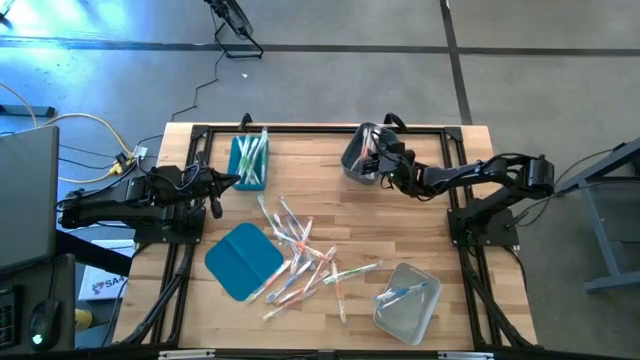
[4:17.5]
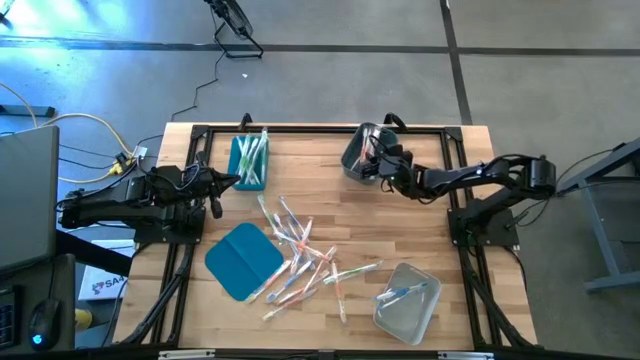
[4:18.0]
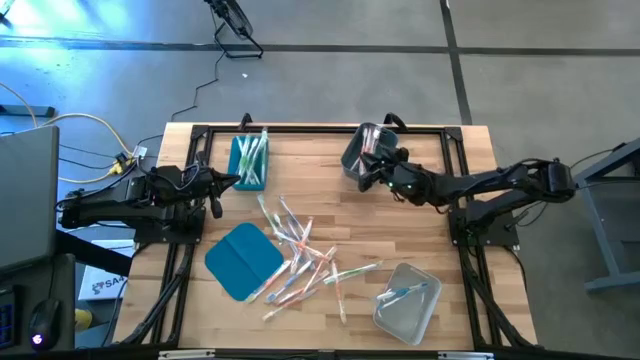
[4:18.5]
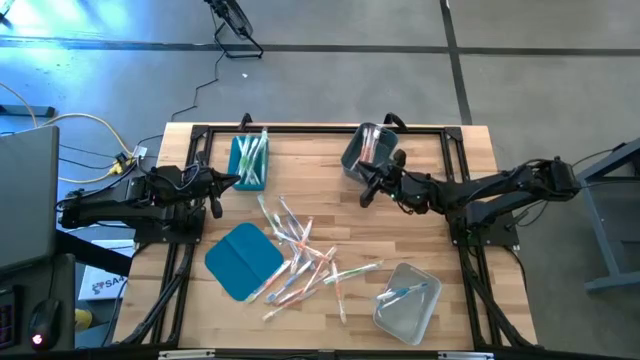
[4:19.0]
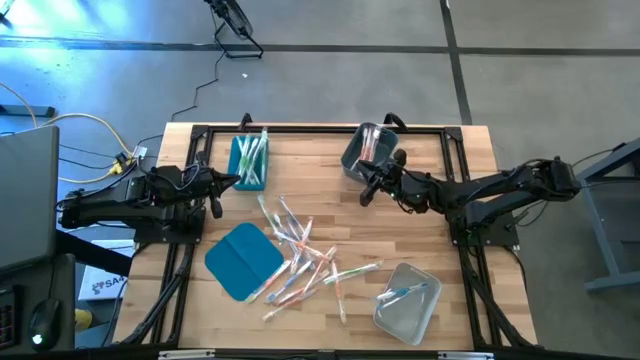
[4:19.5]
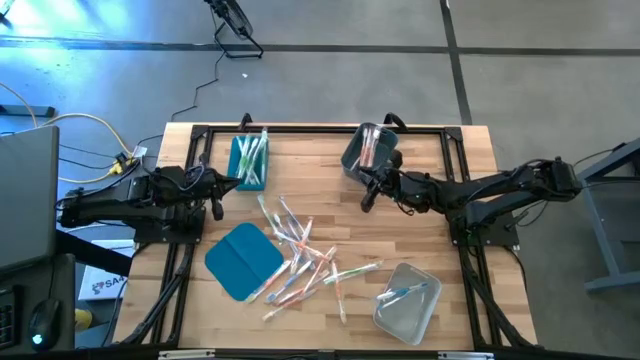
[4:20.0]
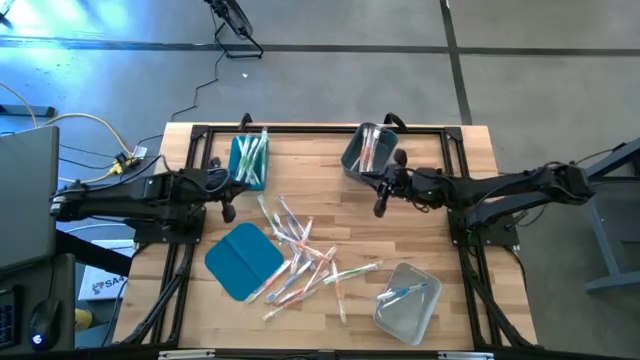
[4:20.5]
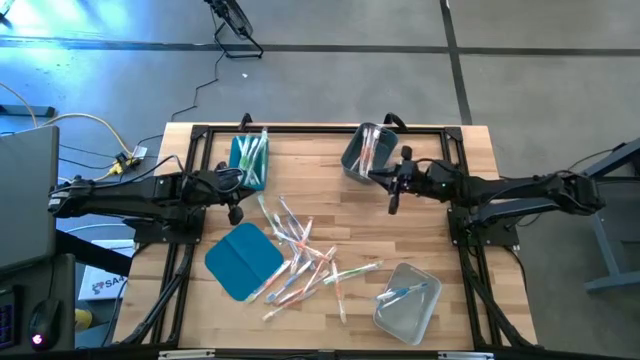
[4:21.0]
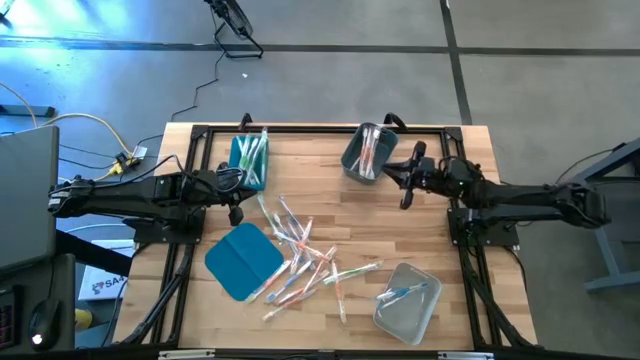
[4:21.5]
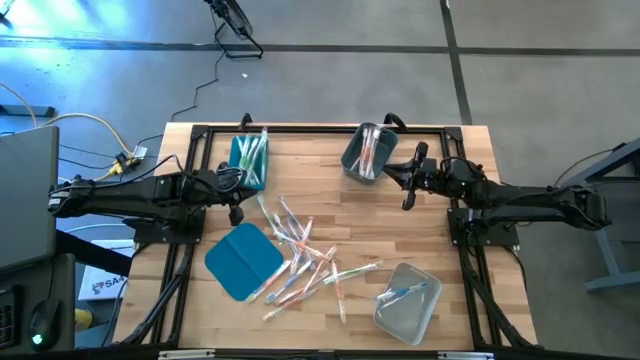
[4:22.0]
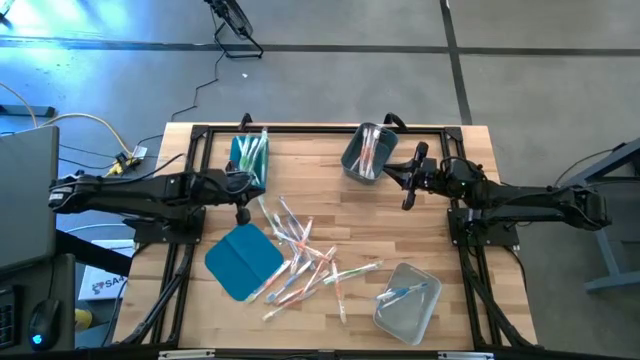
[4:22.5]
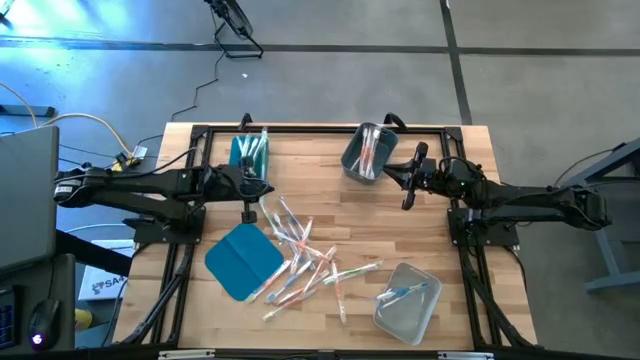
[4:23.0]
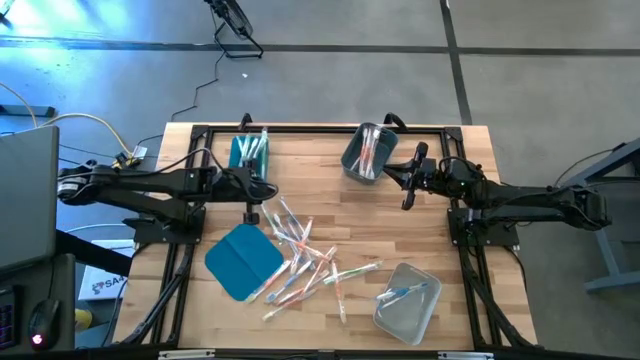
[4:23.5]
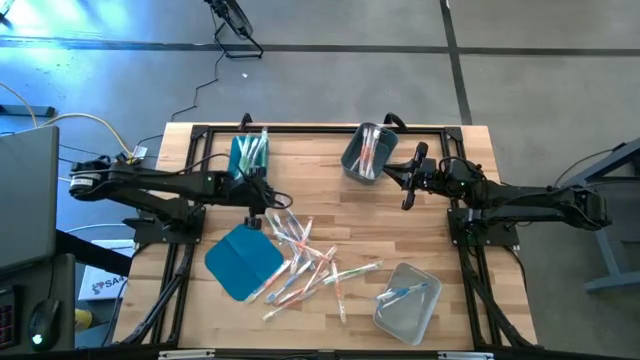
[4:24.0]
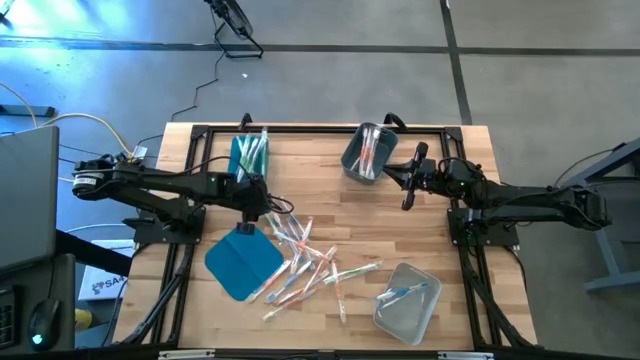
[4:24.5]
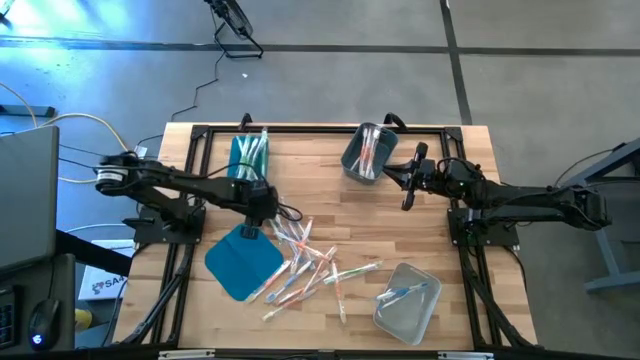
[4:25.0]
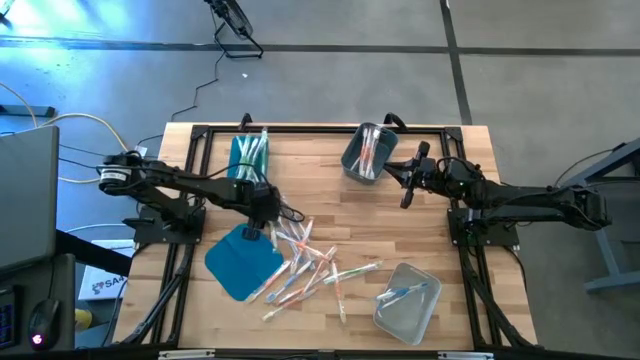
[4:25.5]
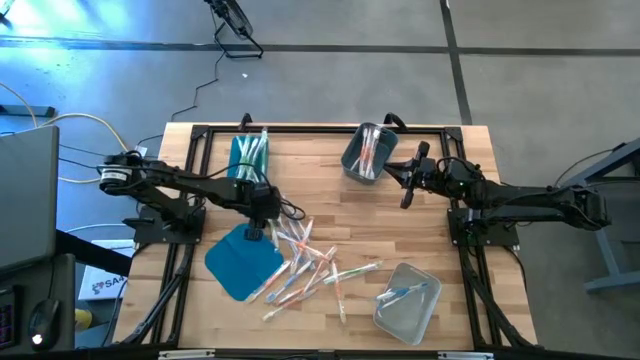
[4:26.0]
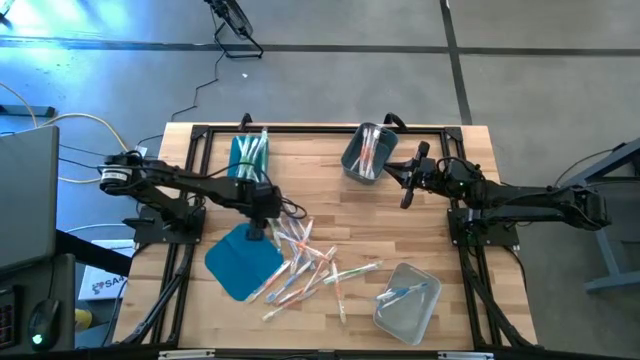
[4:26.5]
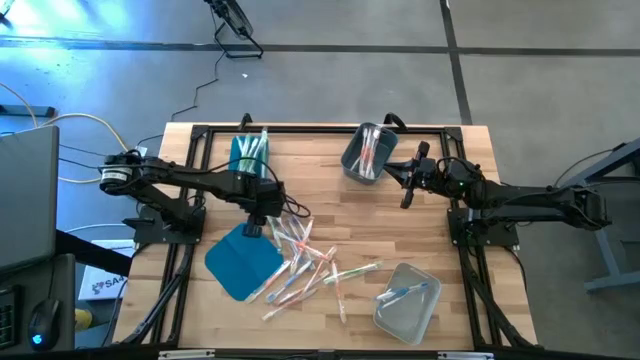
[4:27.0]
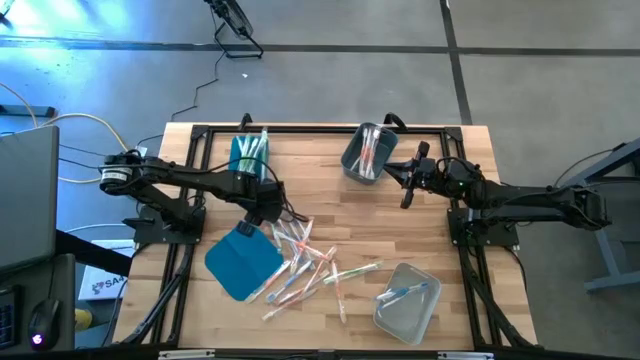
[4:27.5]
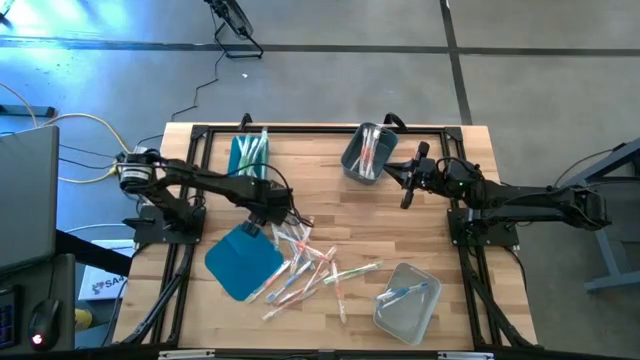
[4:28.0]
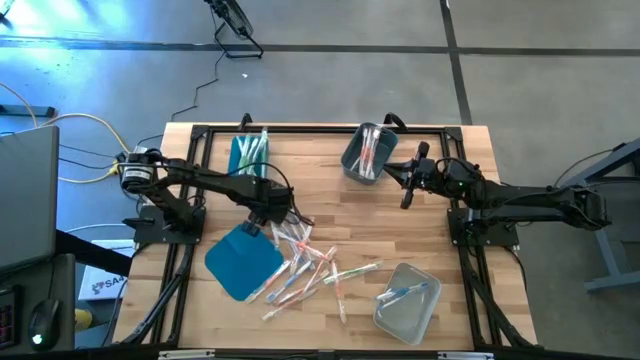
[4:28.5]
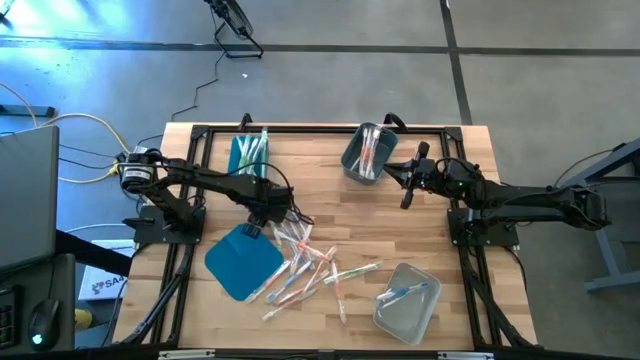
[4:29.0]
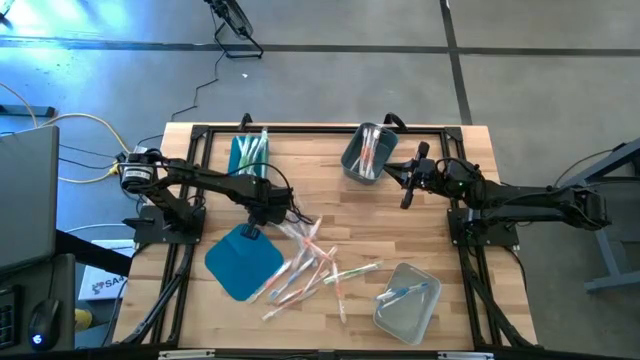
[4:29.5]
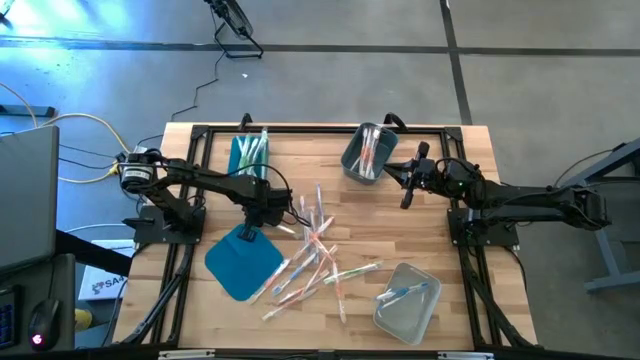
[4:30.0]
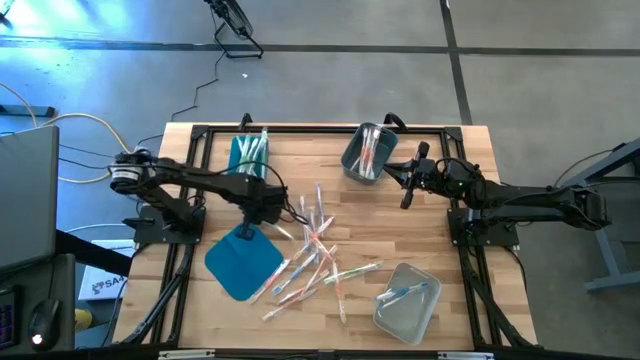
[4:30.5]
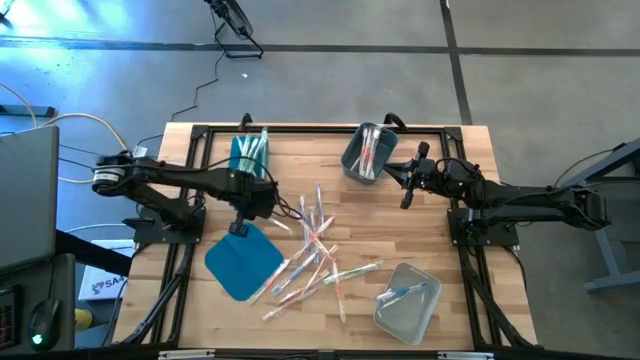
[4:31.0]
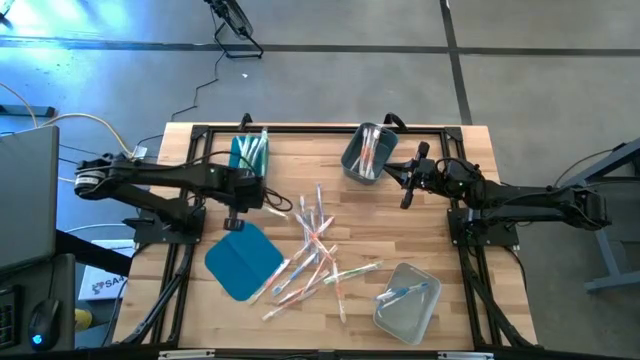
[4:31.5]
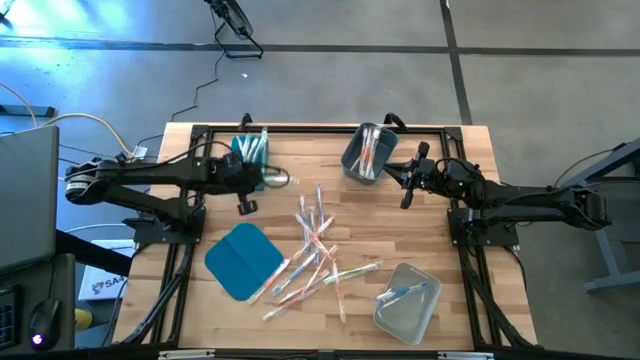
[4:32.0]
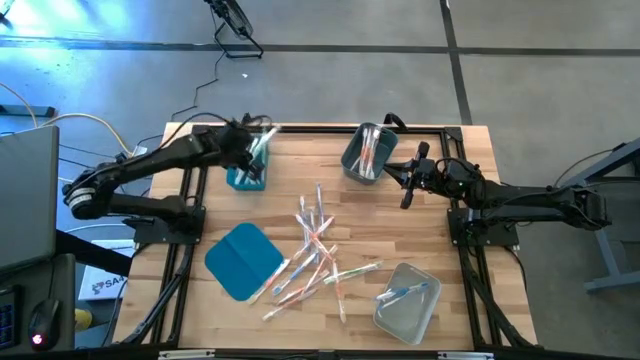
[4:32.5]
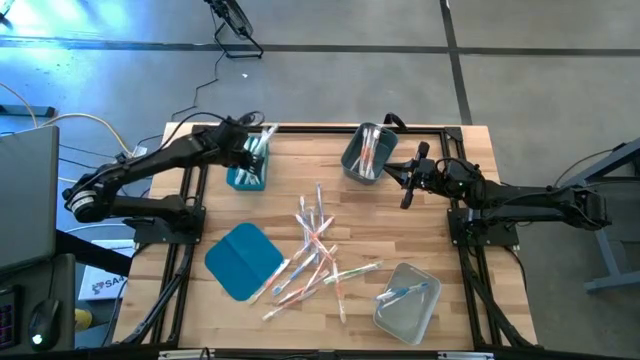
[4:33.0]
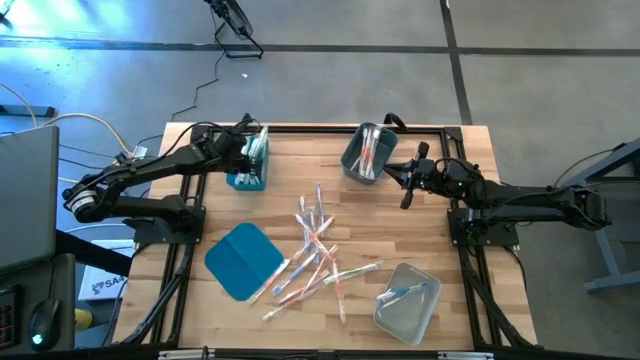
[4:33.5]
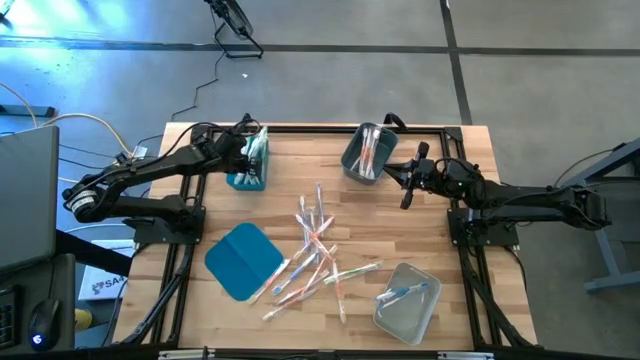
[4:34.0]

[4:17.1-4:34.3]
Task: Pick & Place Toothbrushes
Put the left green toothbrush into the blue bin
